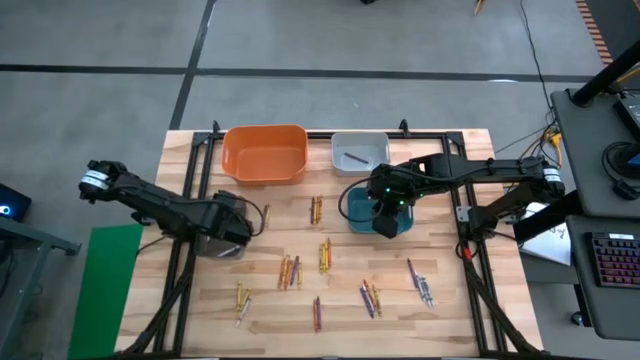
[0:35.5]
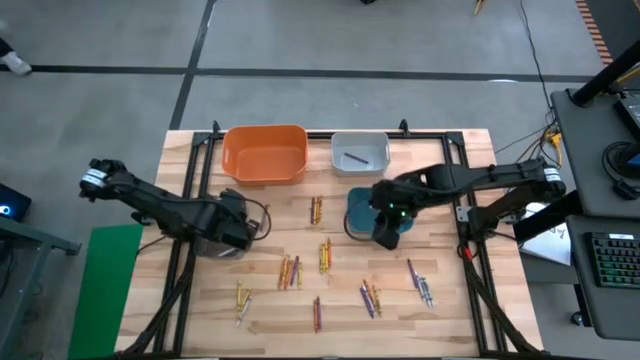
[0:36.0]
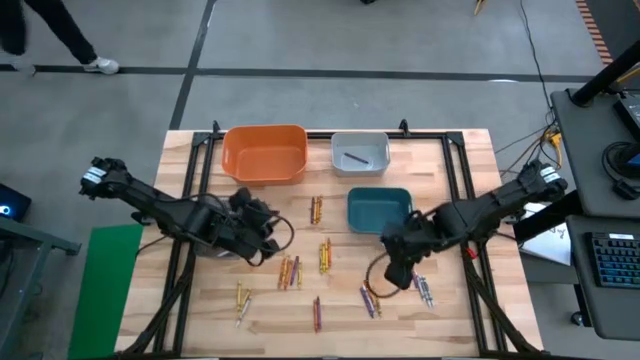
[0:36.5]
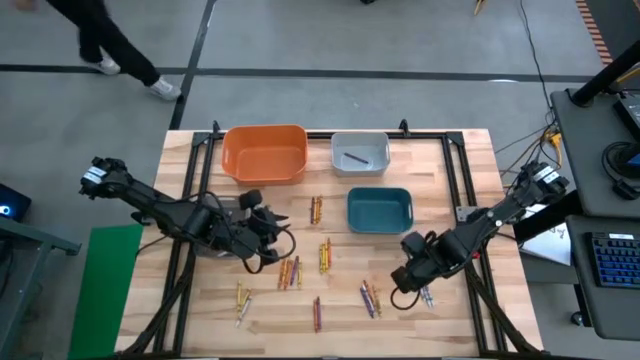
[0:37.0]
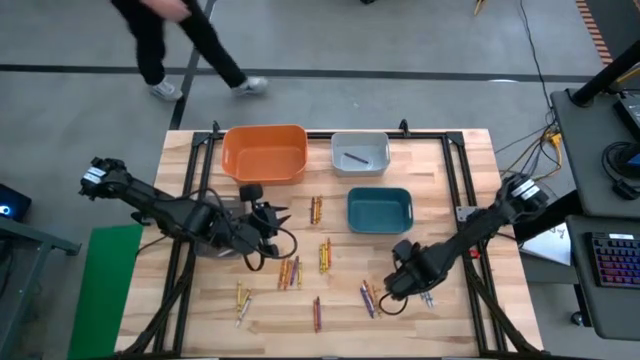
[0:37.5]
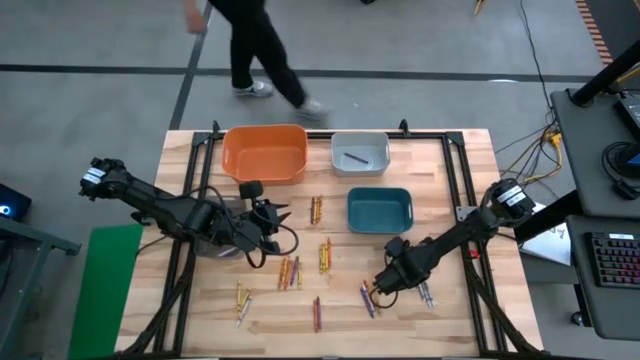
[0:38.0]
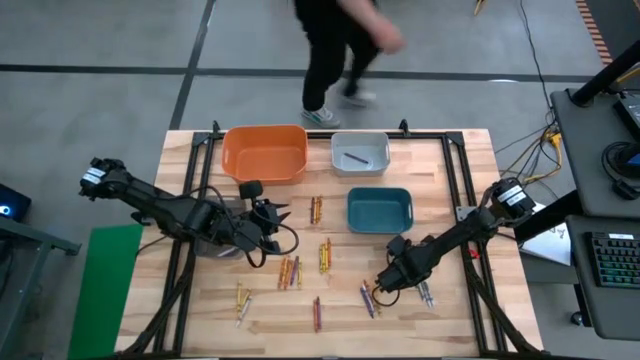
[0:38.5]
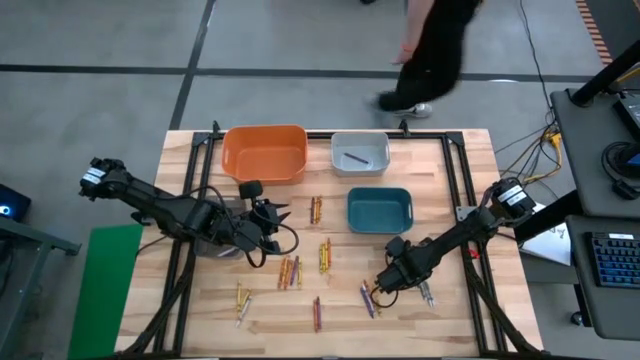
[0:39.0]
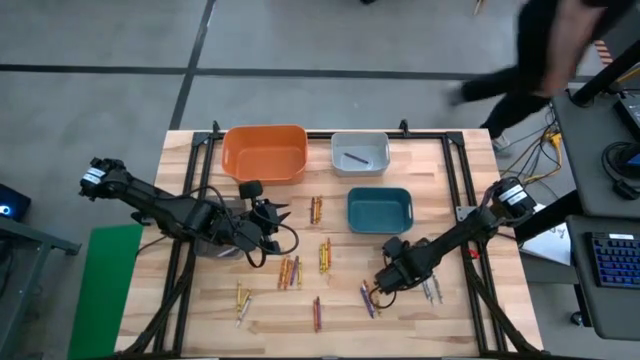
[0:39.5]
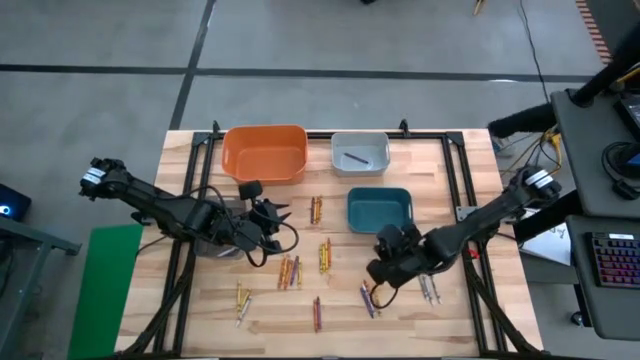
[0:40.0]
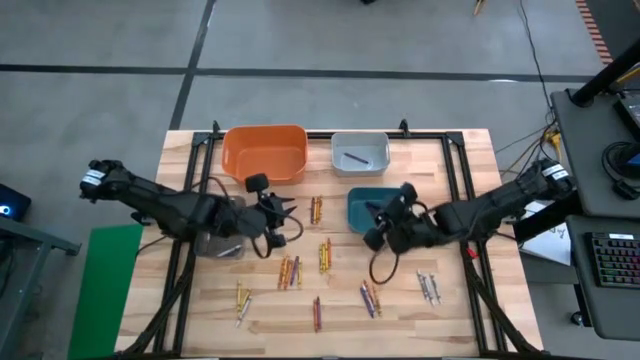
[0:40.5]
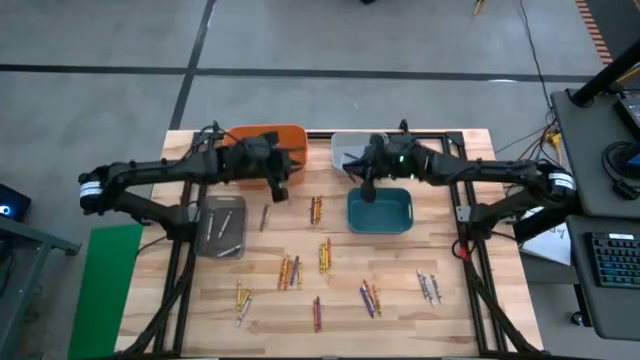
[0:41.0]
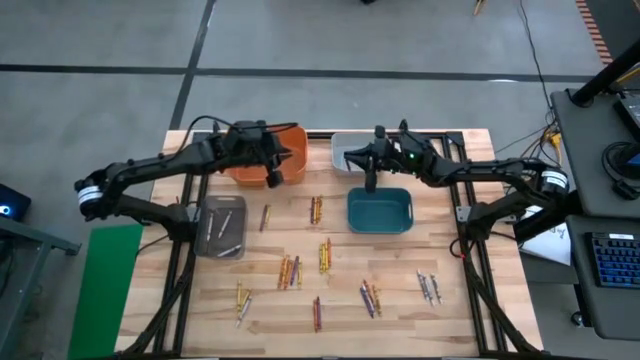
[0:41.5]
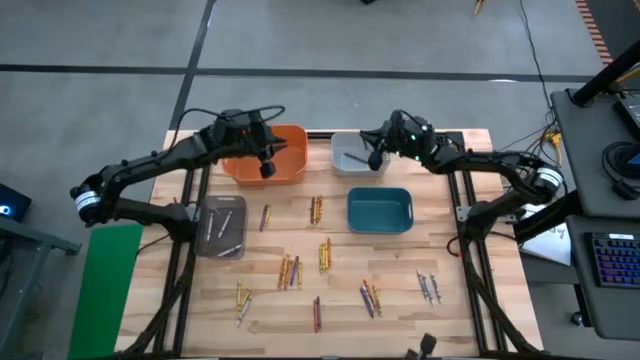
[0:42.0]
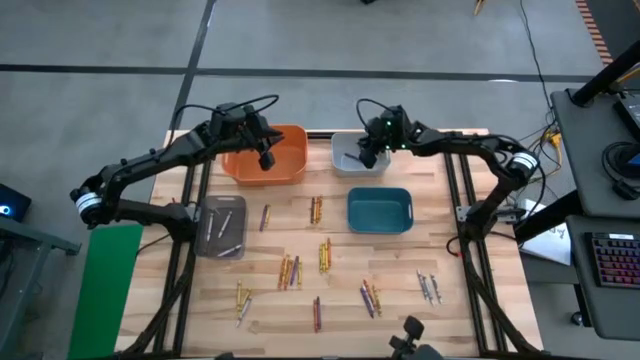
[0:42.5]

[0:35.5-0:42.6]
Task: Sort crayons
Put the violet crayon into the gray bin

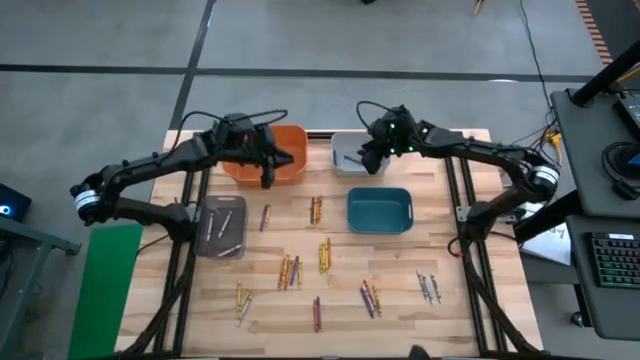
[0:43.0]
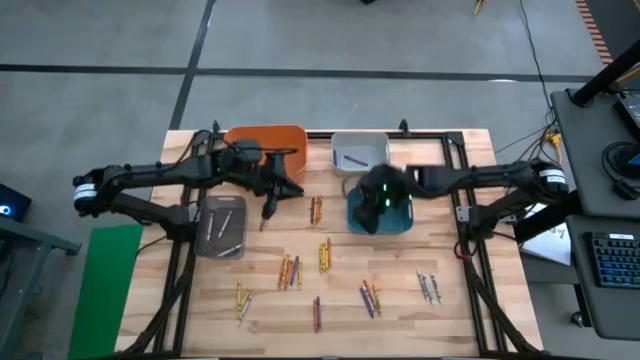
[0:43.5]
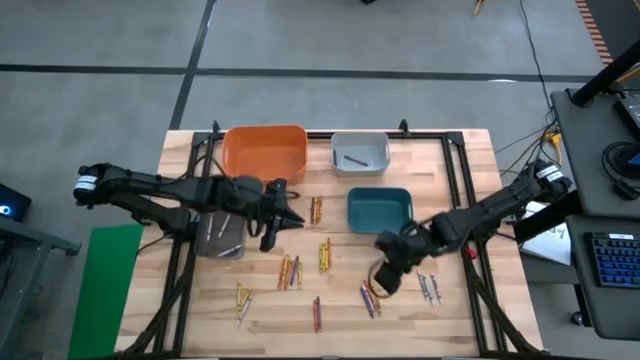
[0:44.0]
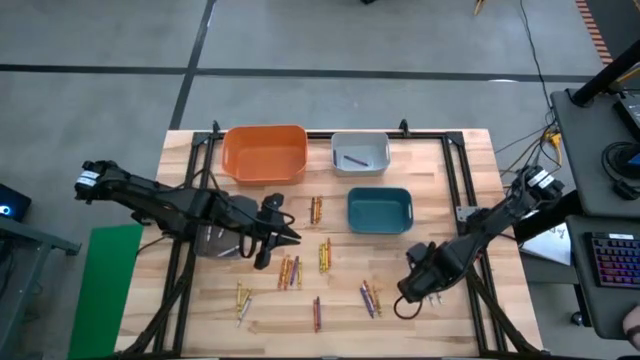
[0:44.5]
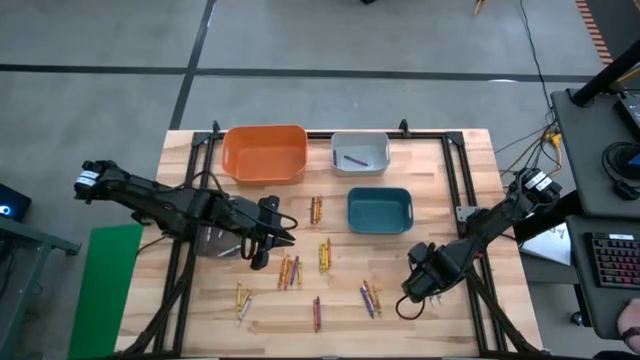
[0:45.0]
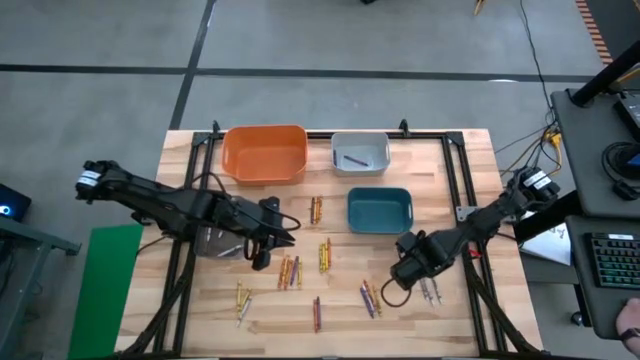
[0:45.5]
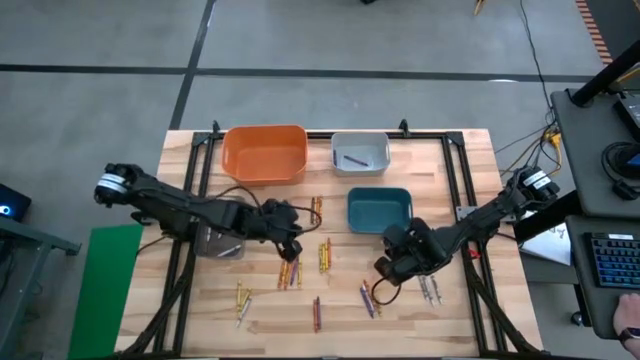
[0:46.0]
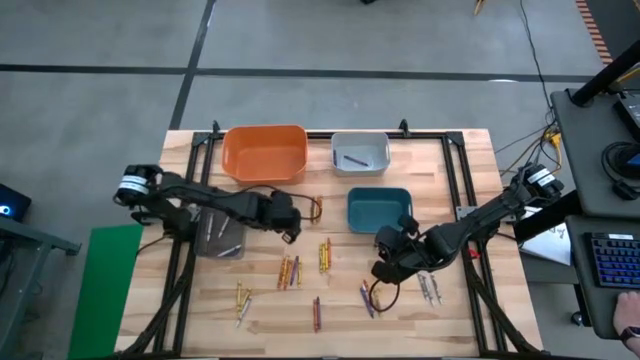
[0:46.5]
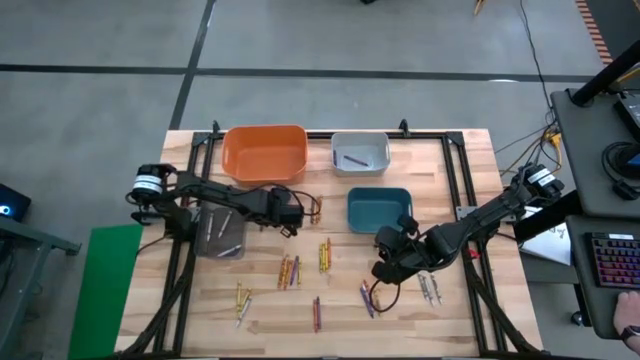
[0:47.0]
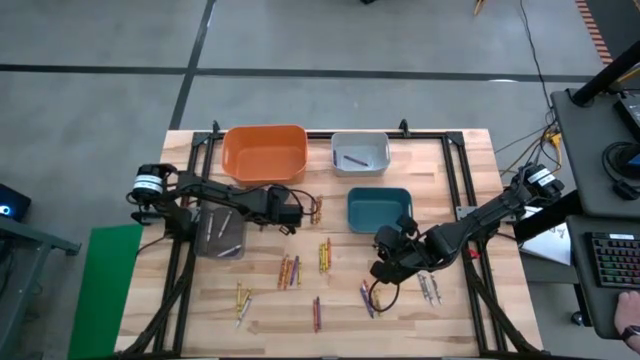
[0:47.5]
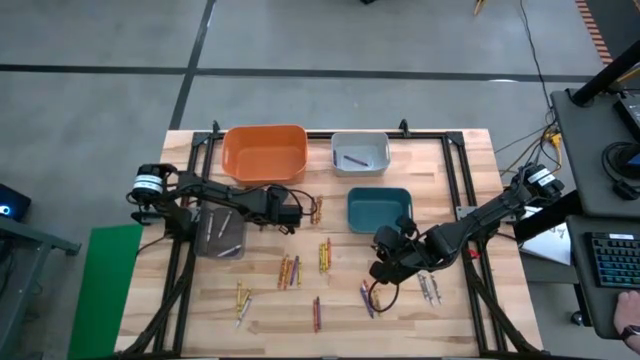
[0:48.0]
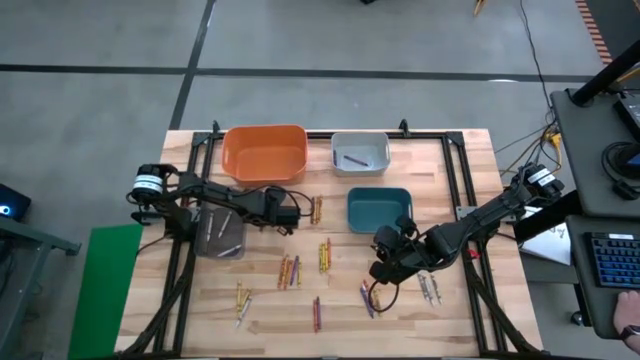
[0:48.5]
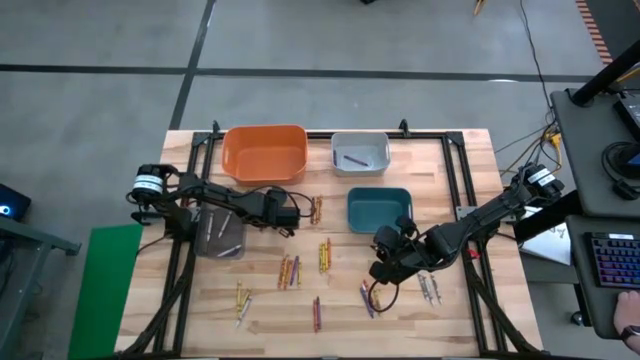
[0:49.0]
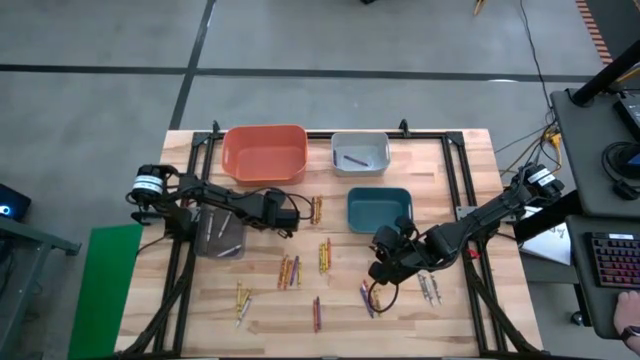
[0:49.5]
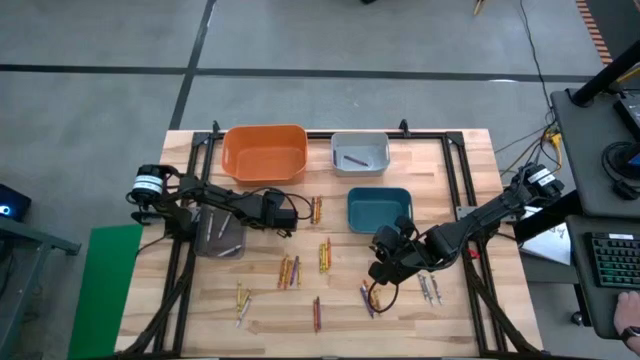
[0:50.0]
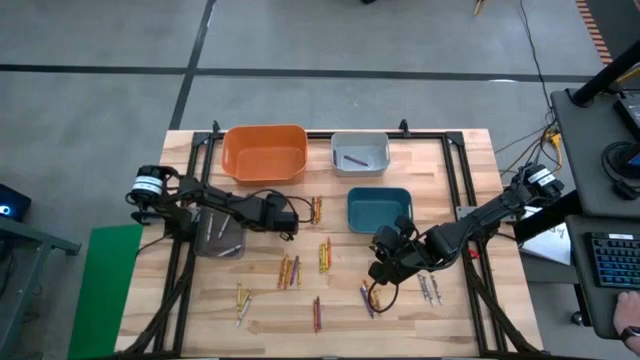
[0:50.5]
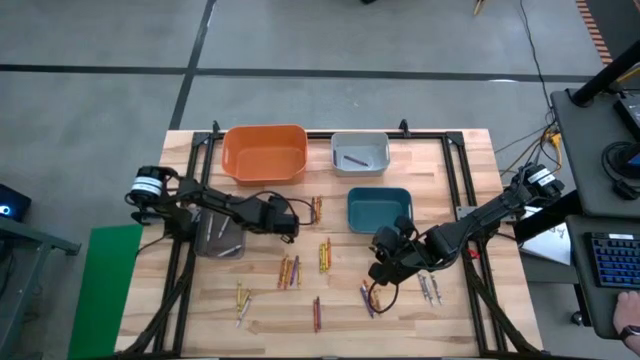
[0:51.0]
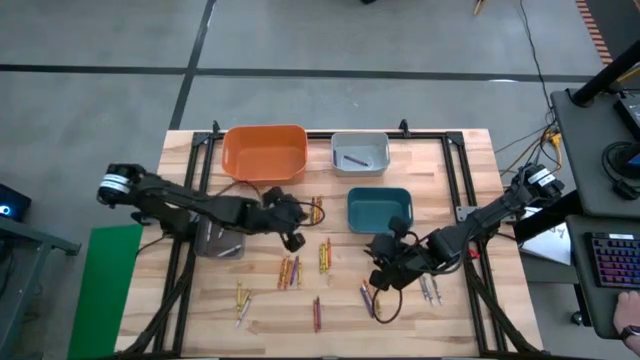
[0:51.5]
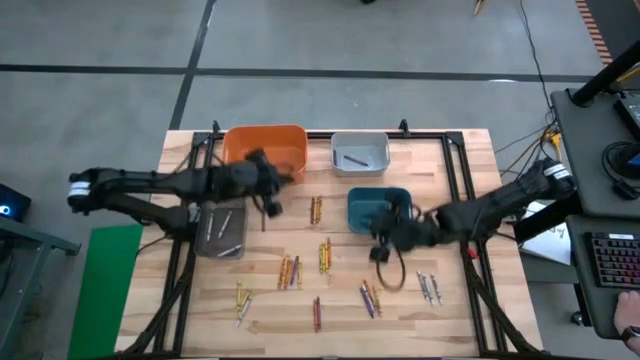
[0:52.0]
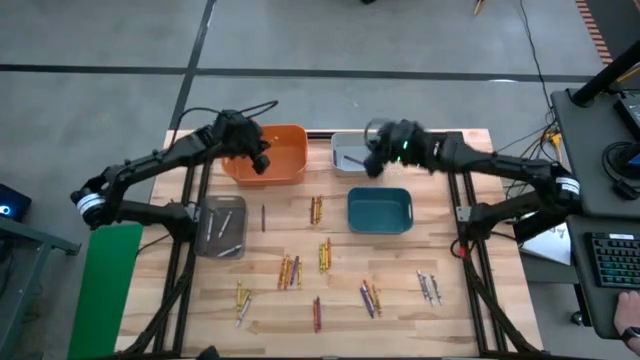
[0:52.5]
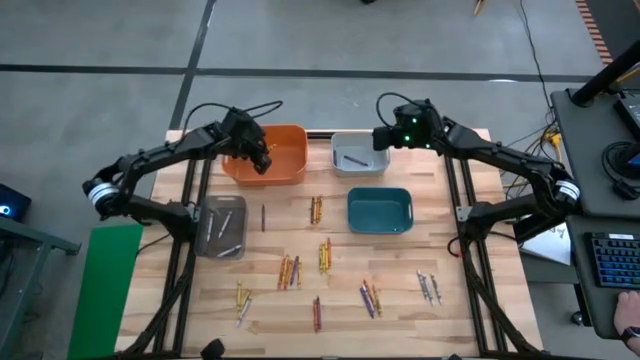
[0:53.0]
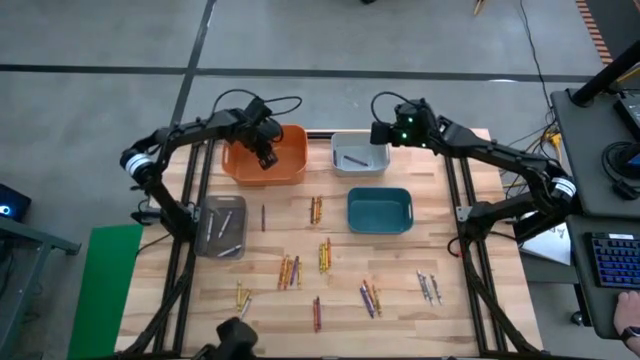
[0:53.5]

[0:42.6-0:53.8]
Put the yellow crayon into the orange bin

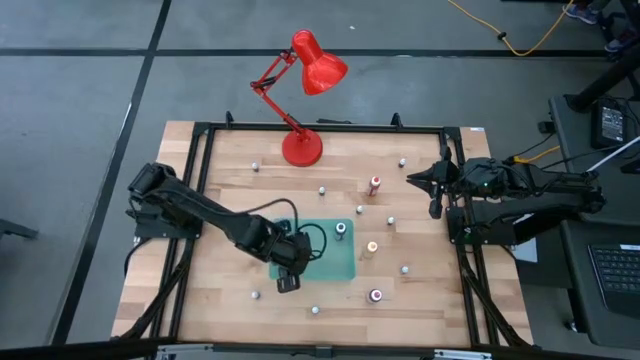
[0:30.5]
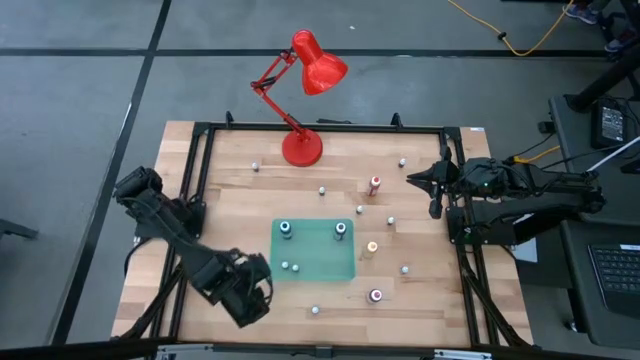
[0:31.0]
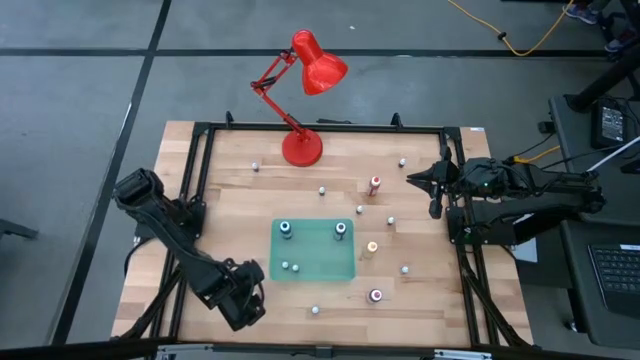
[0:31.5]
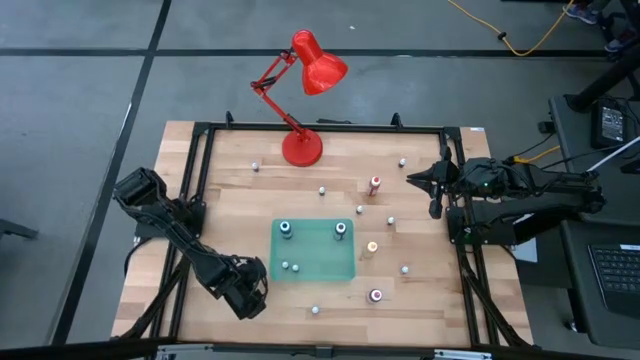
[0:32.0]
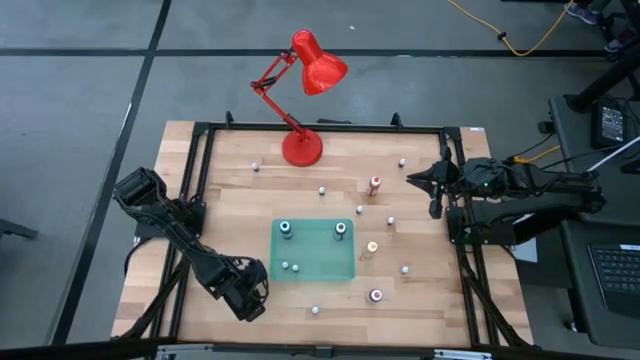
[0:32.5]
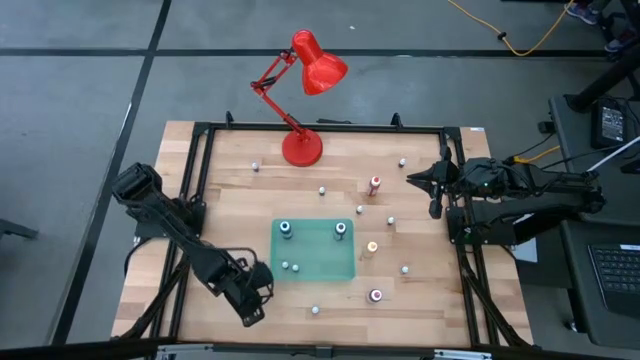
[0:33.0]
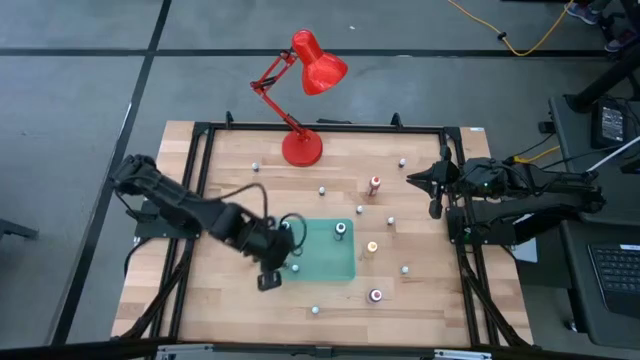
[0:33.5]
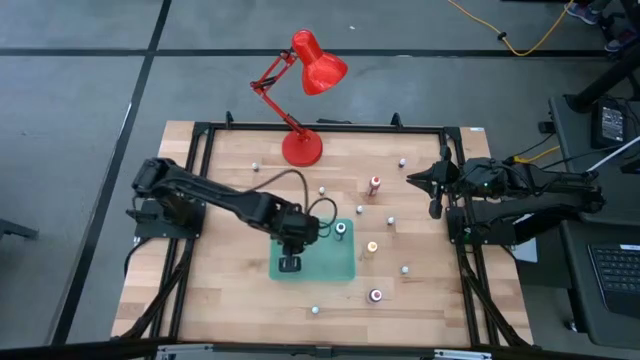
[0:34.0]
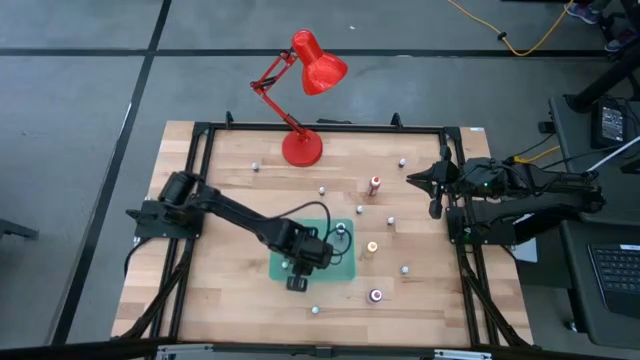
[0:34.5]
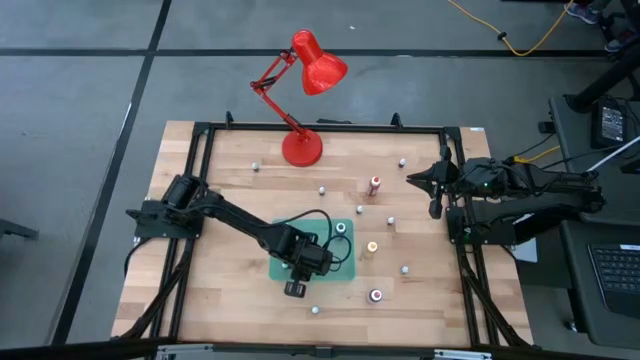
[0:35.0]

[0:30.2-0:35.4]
Task: Pick & Place food coloring
Put the left small red bottle into the green bin
